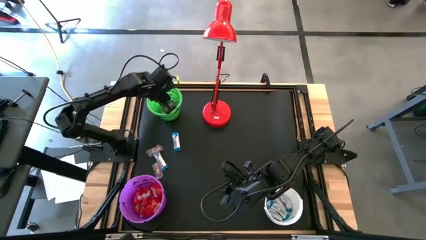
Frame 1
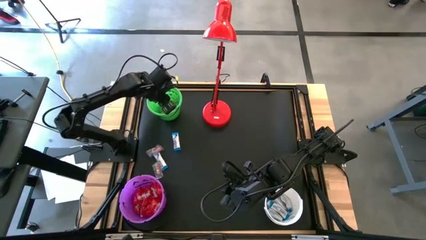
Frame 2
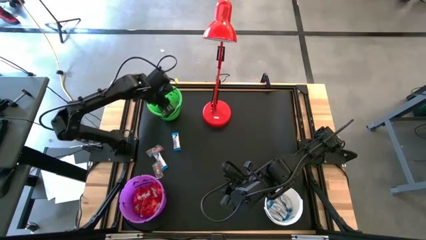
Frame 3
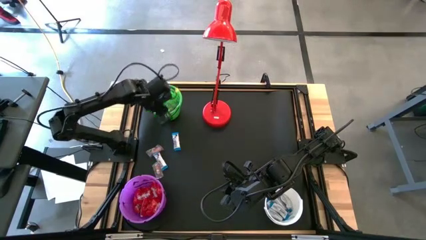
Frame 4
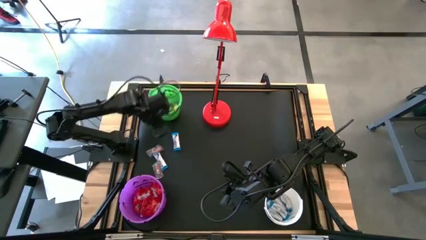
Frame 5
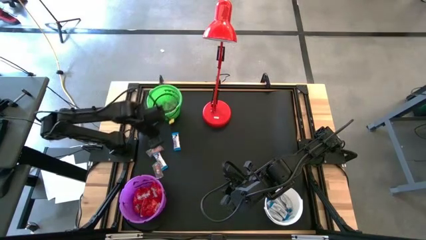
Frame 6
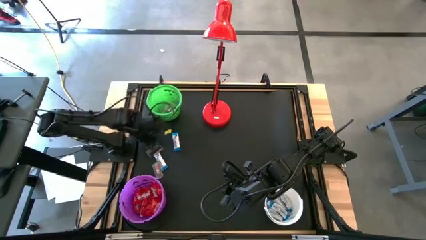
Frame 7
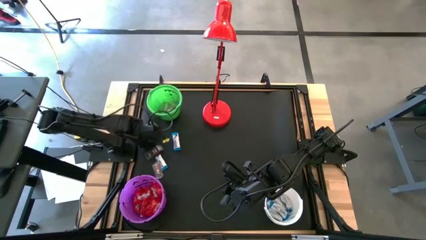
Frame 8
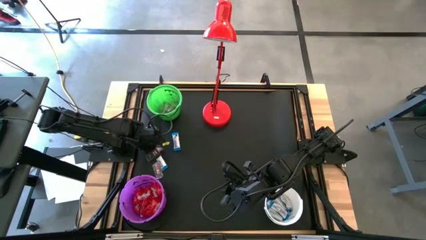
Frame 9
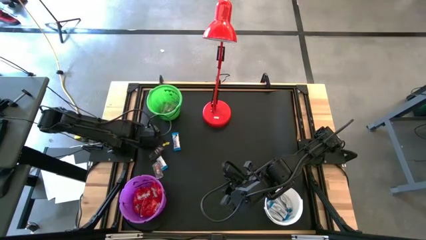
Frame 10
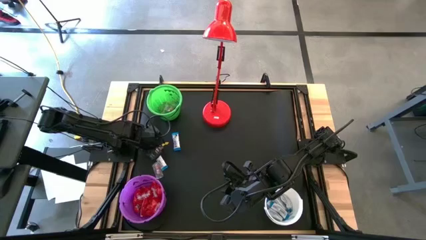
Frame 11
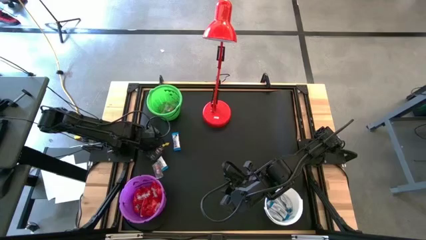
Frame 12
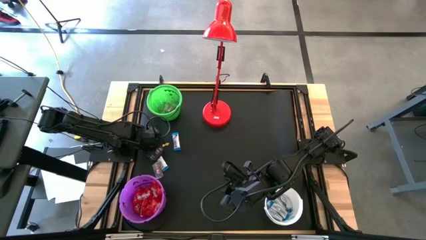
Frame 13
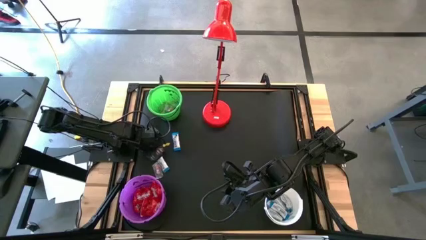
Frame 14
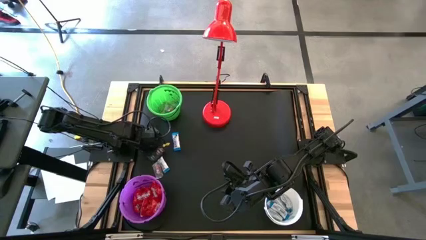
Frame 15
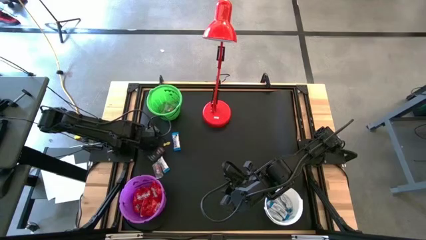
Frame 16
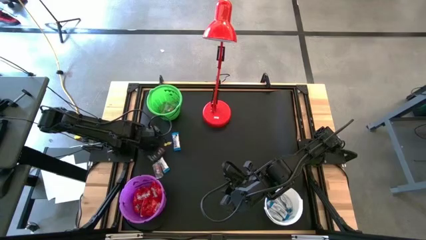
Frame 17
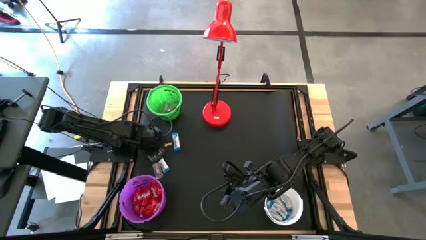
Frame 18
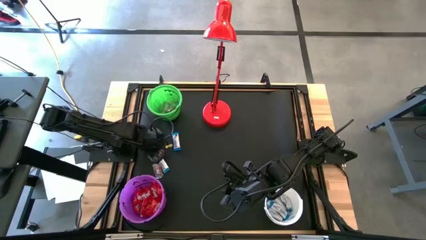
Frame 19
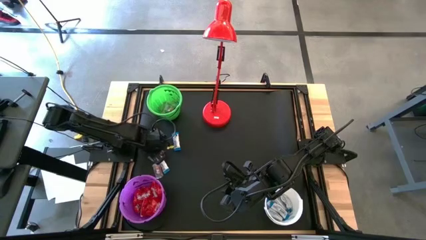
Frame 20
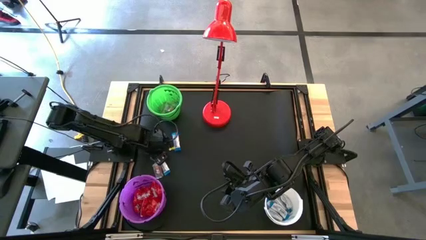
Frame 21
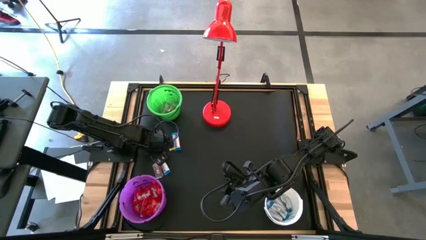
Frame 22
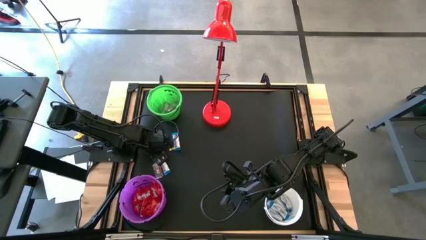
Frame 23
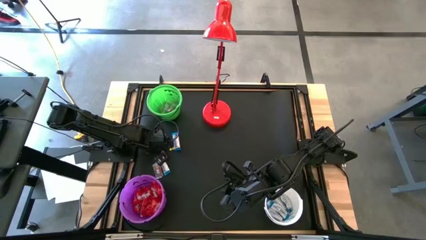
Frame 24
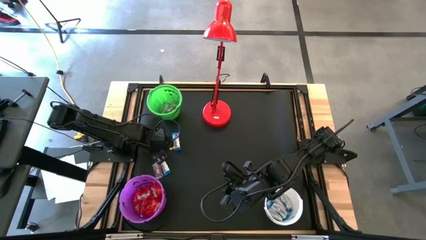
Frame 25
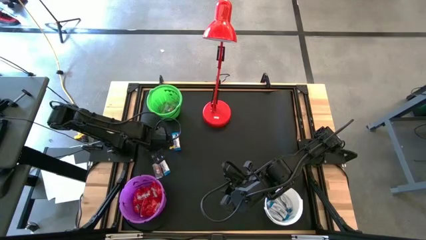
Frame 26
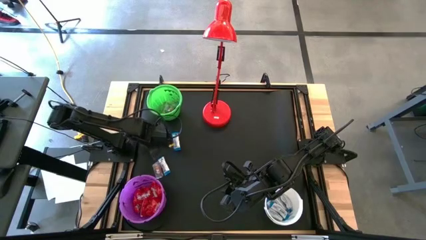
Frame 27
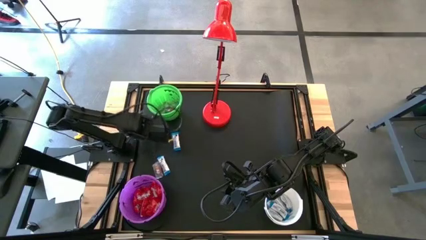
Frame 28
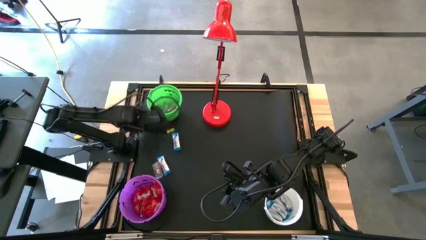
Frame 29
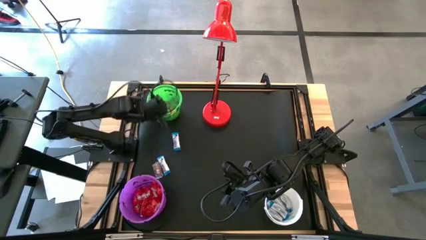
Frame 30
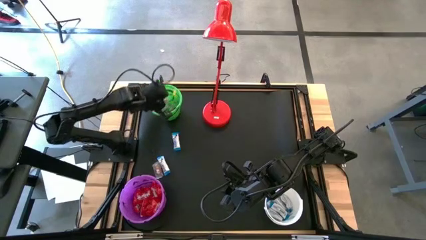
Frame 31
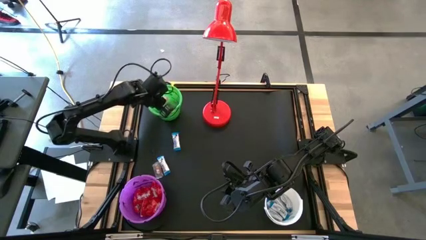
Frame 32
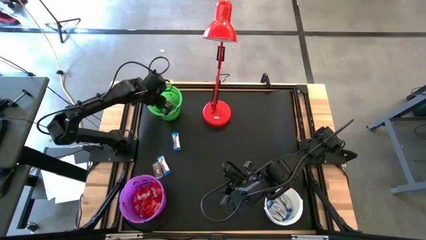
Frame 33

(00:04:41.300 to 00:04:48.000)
Task: Sort candy
Put the orange gummy into the green bucket

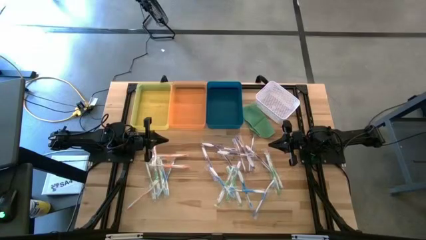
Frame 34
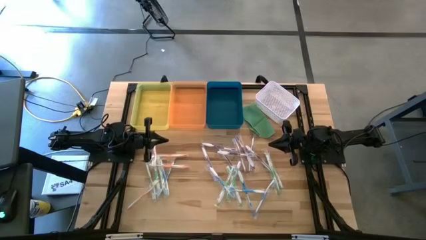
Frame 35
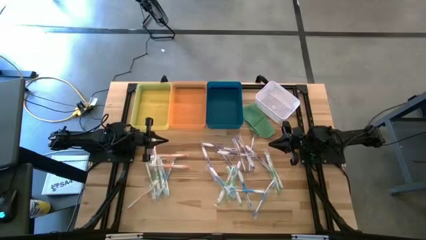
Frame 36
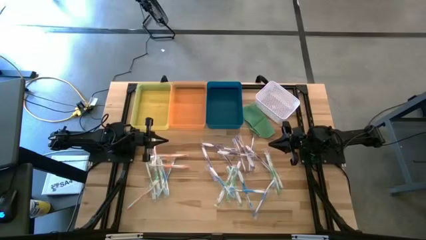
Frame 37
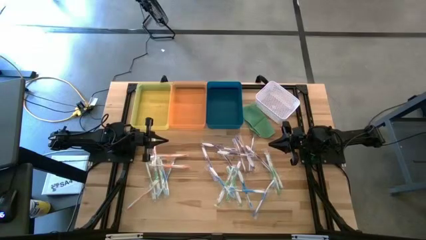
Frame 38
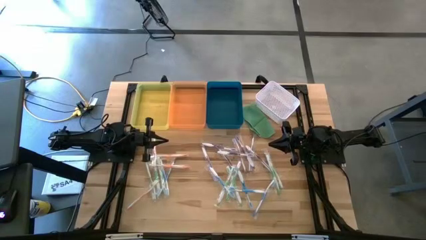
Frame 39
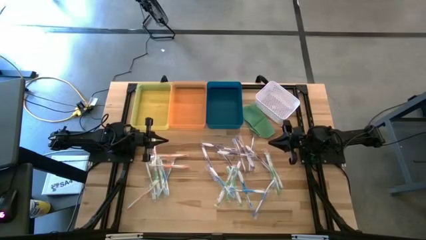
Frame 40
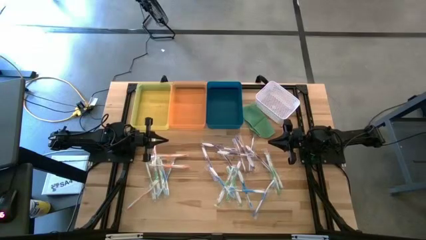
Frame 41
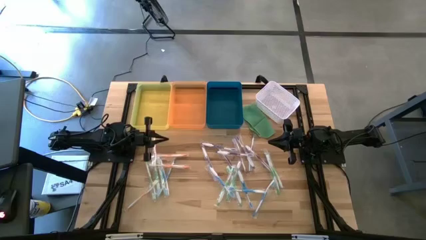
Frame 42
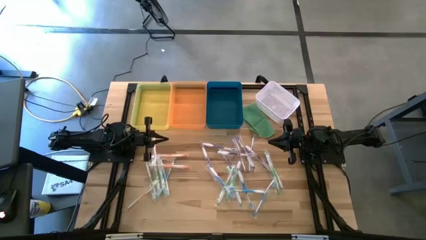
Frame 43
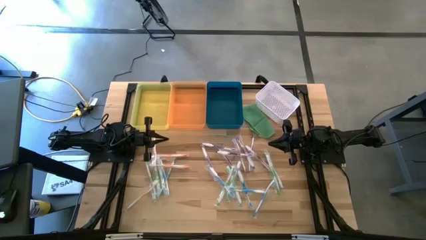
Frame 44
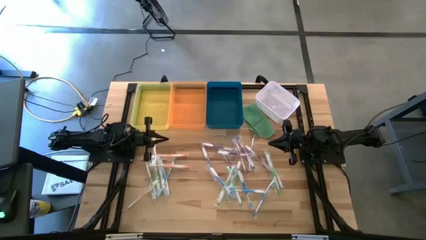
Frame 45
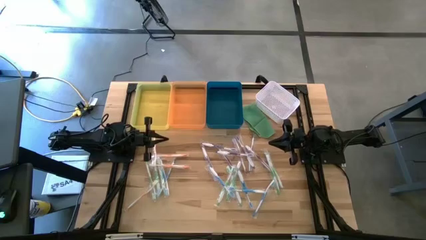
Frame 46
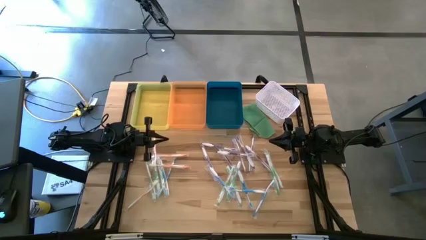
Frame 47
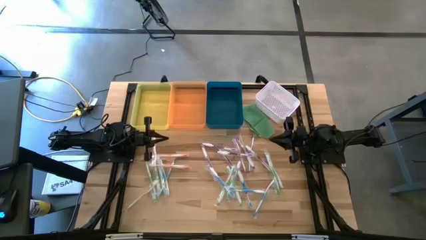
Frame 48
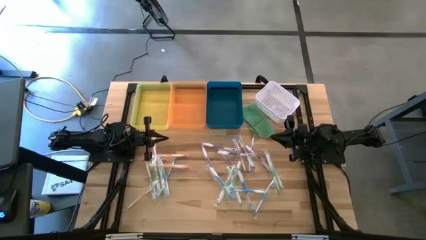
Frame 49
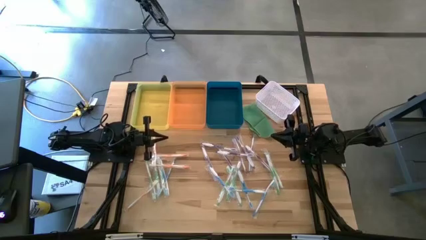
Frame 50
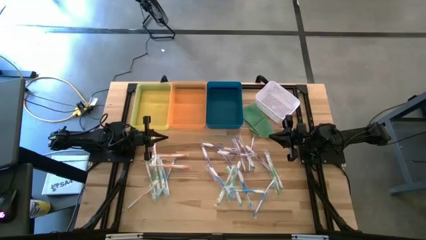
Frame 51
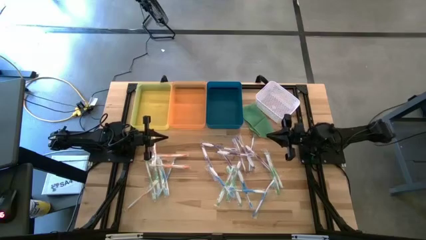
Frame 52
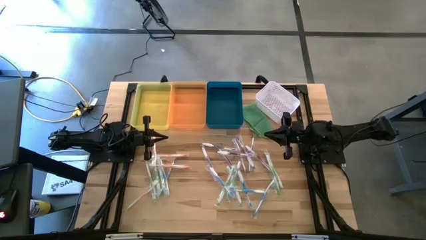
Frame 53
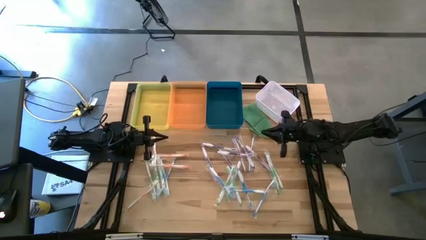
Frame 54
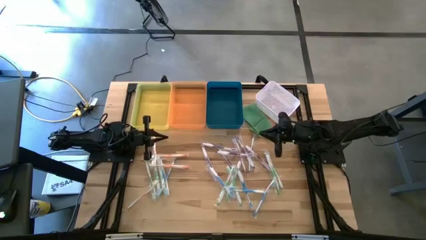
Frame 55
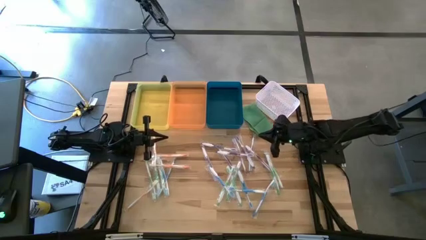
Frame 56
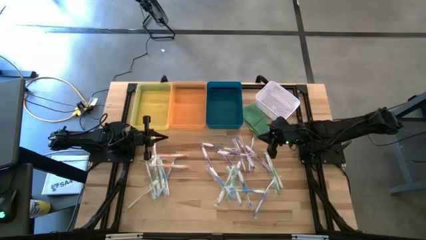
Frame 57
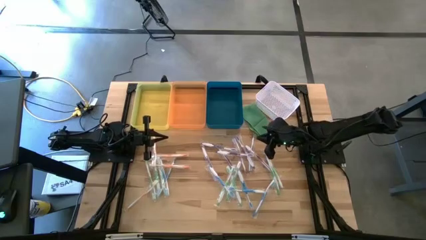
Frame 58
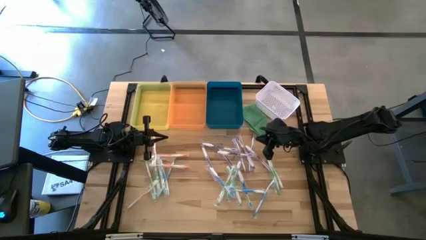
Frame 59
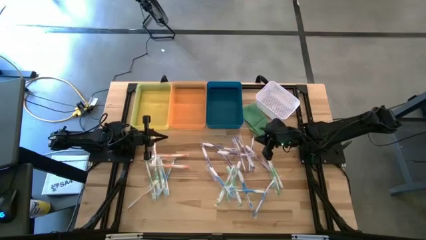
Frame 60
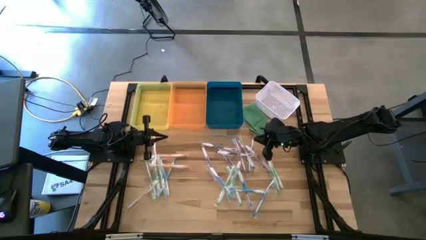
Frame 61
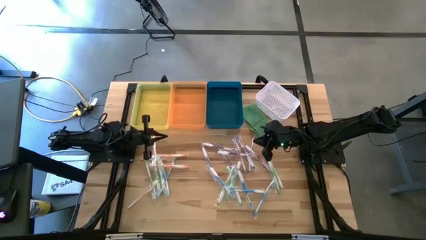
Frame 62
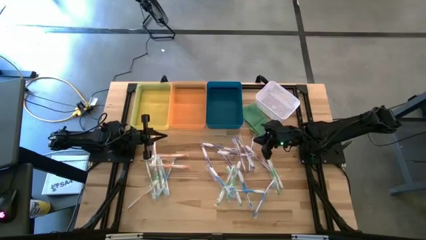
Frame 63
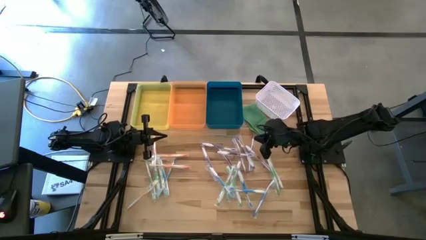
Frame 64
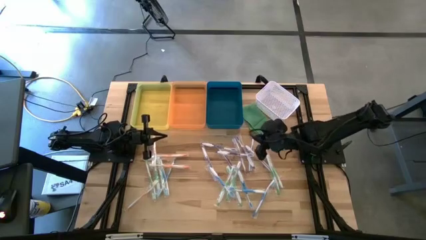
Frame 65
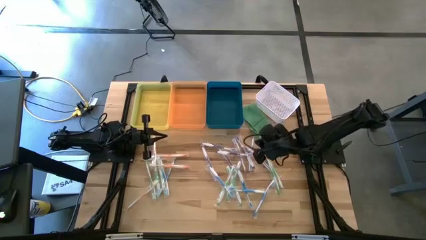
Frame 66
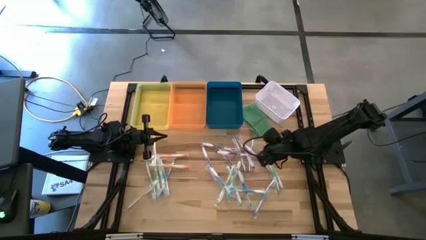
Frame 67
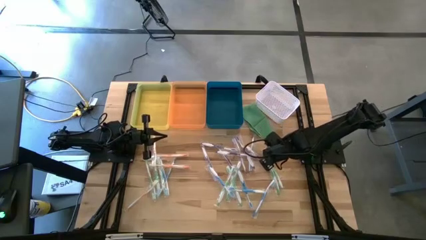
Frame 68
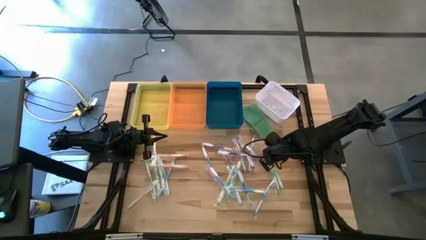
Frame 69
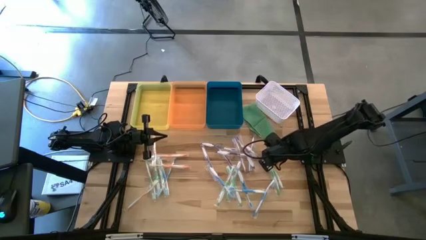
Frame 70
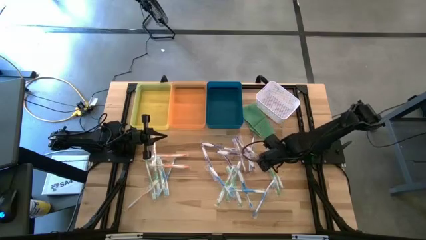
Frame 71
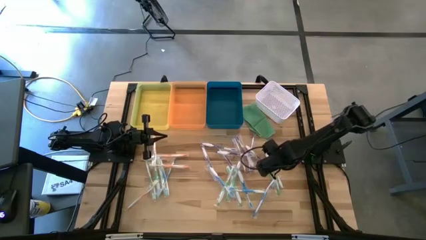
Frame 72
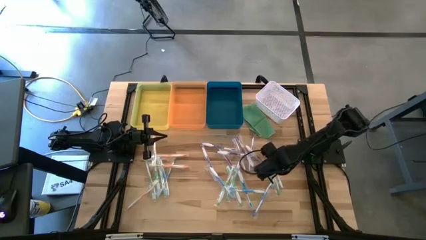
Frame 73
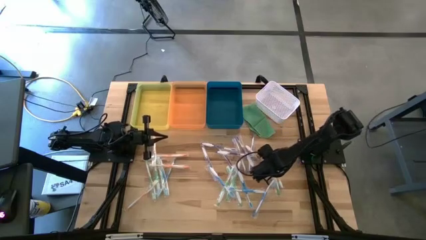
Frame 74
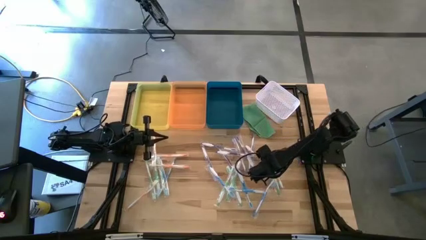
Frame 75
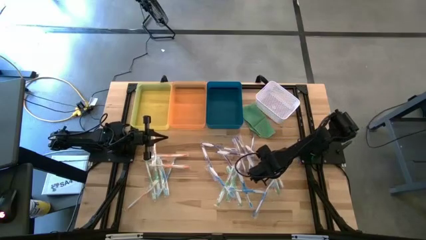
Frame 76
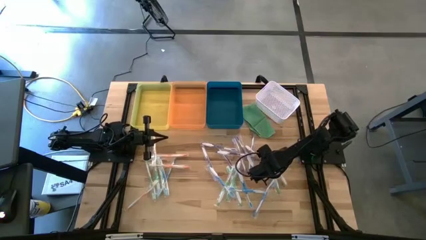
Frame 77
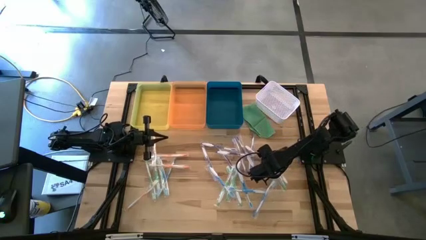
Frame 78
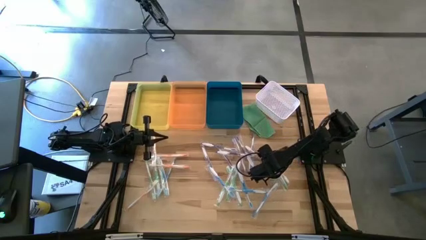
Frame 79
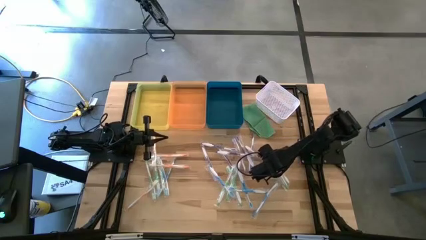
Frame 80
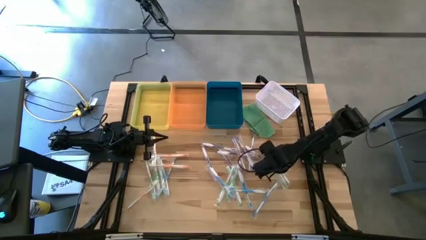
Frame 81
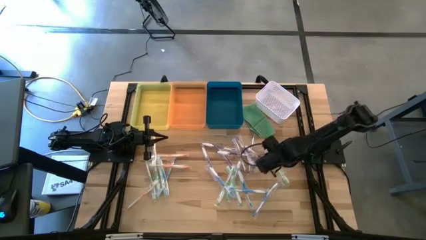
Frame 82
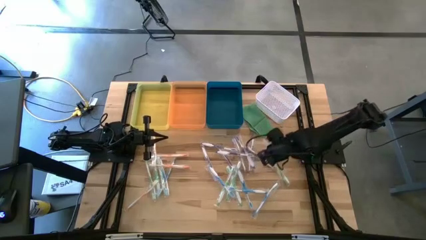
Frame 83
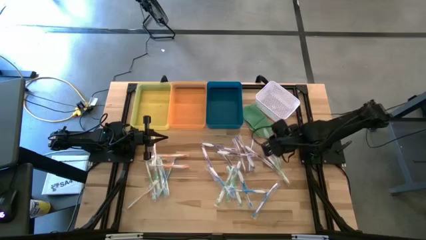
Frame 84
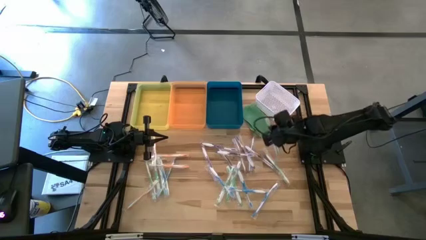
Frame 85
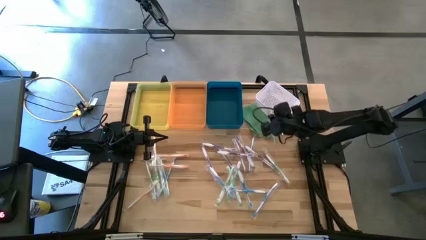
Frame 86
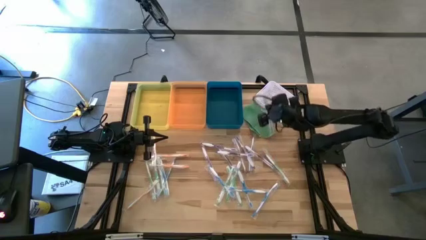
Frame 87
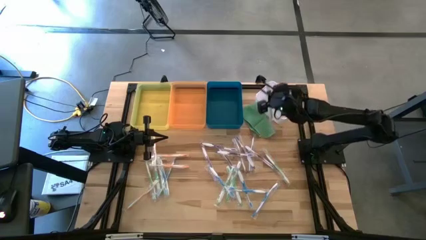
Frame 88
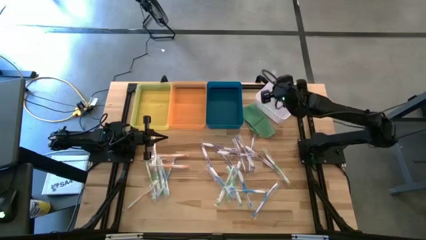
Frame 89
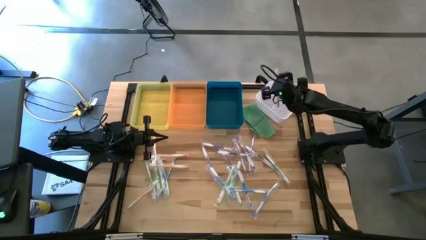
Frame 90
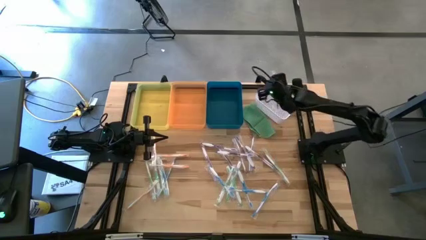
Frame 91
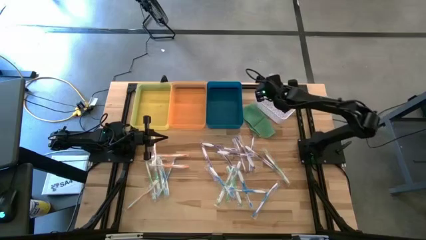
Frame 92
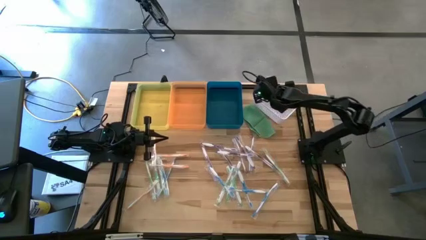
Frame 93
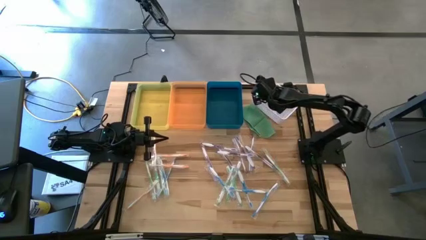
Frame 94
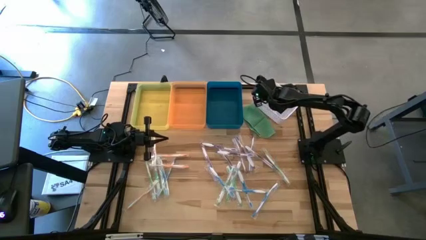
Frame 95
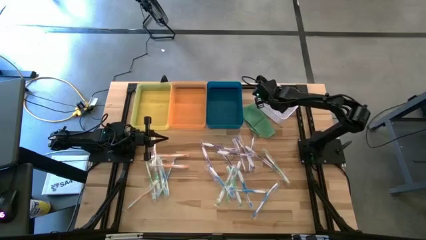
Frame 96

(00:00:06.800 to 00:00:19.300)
Task: Pick & Place Toothbrushes
Put the green toothbrush into the white bin
